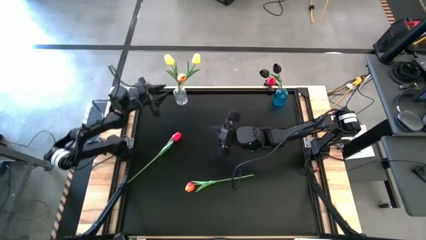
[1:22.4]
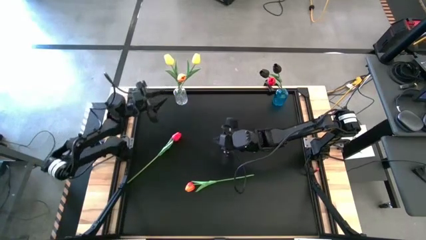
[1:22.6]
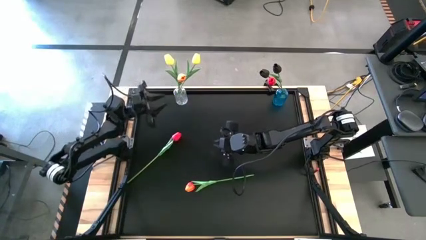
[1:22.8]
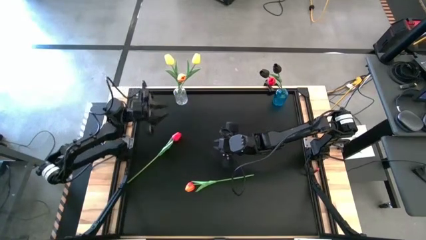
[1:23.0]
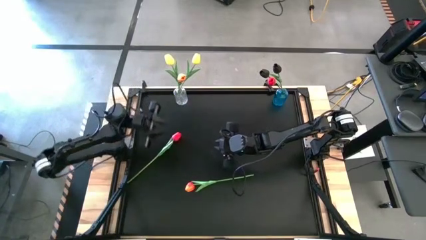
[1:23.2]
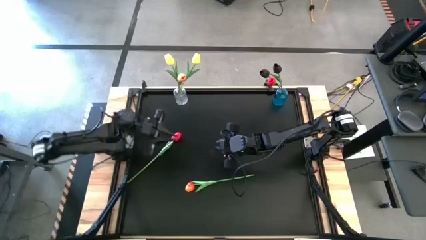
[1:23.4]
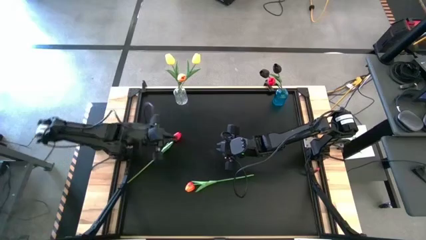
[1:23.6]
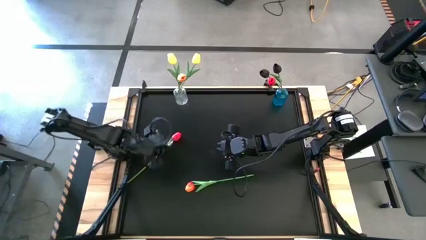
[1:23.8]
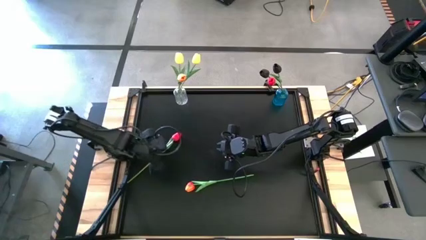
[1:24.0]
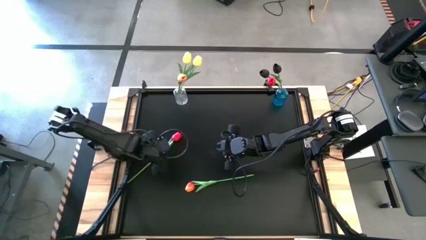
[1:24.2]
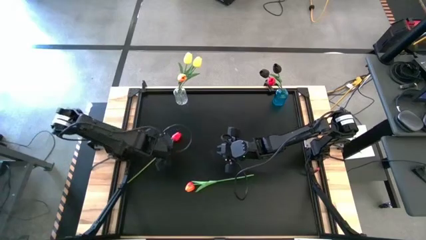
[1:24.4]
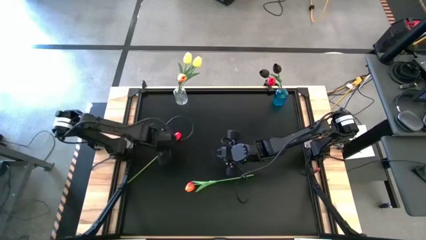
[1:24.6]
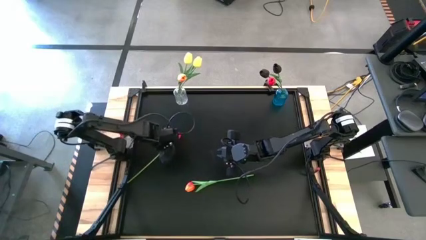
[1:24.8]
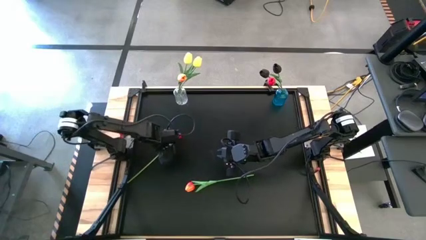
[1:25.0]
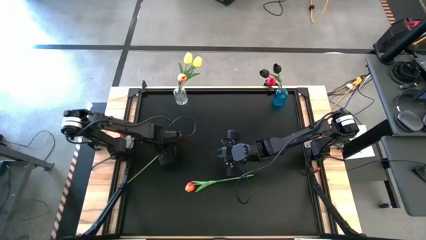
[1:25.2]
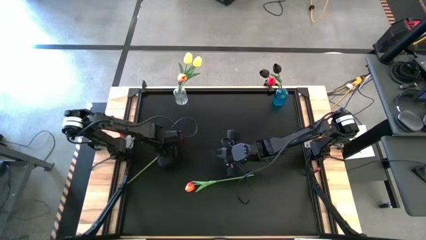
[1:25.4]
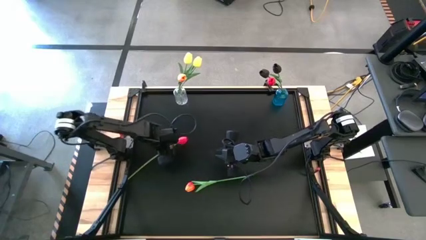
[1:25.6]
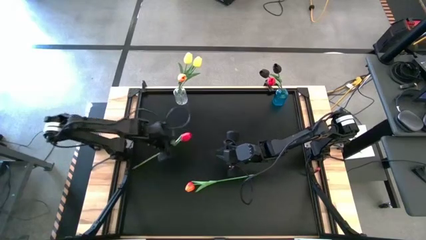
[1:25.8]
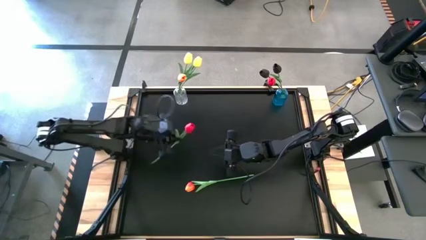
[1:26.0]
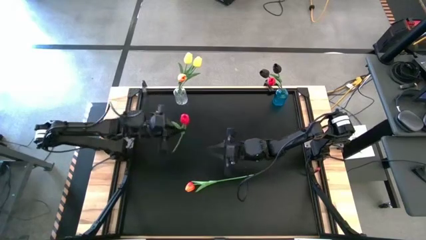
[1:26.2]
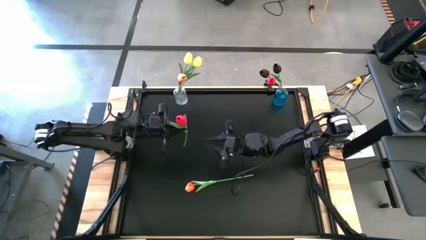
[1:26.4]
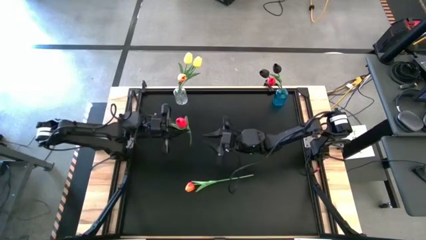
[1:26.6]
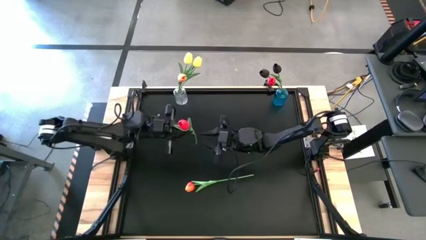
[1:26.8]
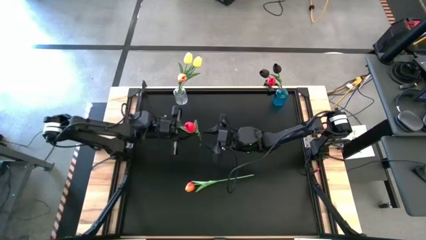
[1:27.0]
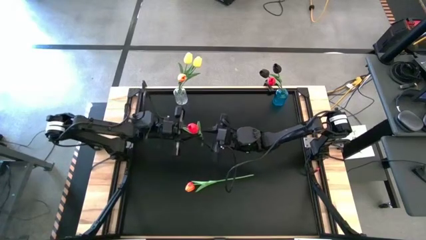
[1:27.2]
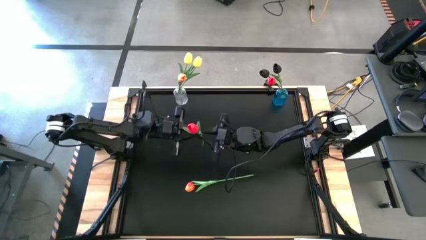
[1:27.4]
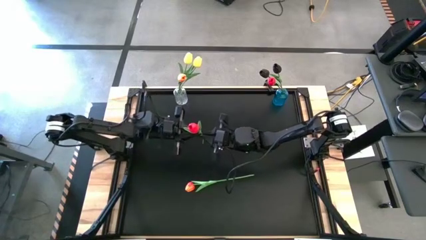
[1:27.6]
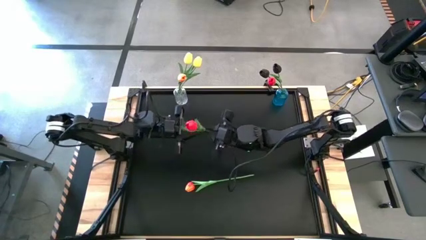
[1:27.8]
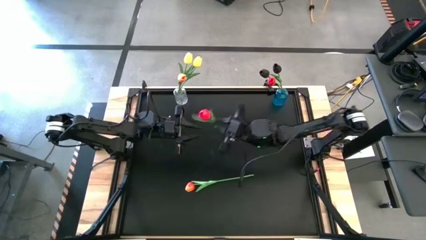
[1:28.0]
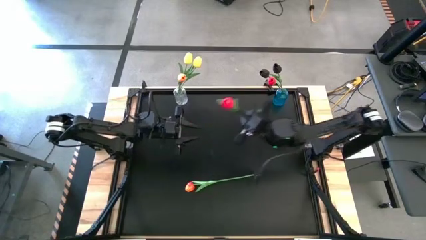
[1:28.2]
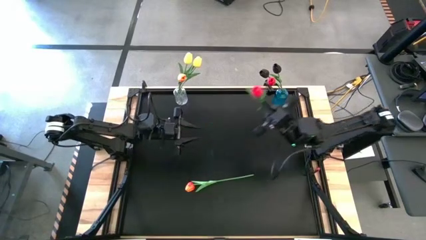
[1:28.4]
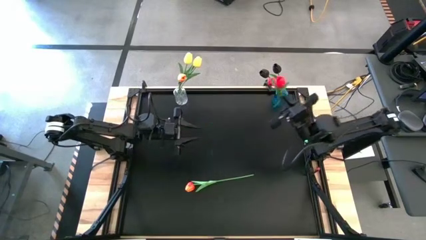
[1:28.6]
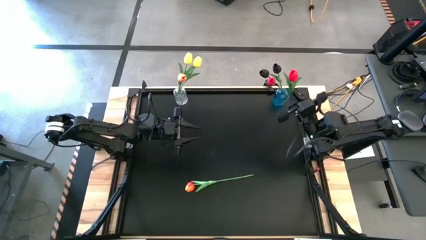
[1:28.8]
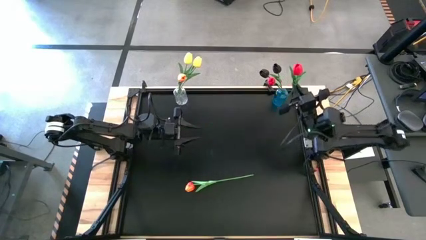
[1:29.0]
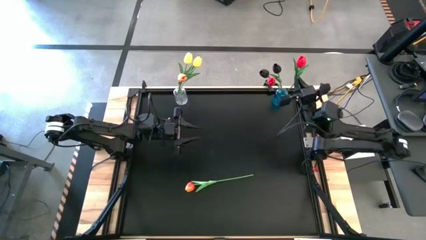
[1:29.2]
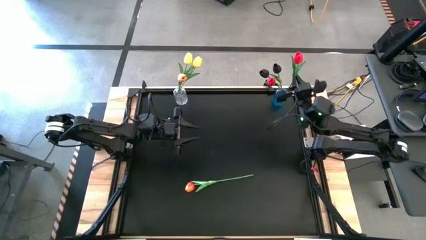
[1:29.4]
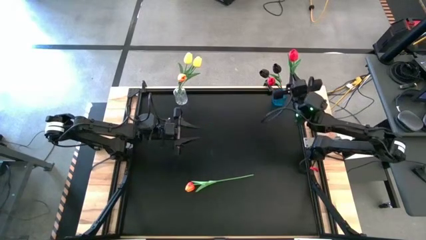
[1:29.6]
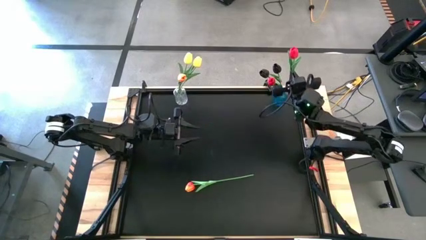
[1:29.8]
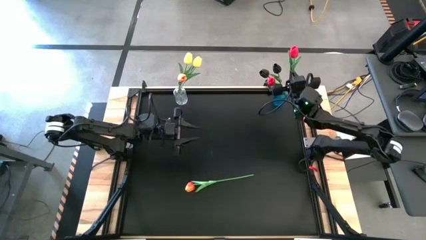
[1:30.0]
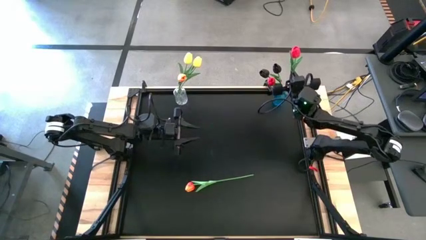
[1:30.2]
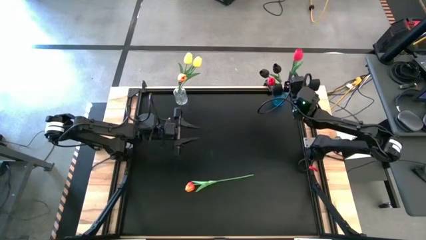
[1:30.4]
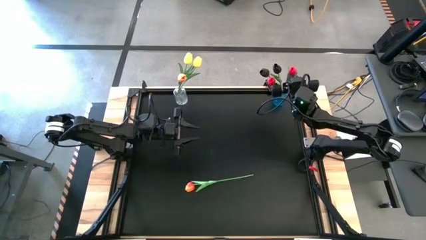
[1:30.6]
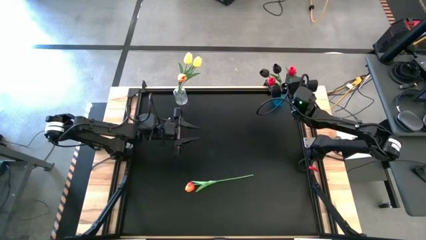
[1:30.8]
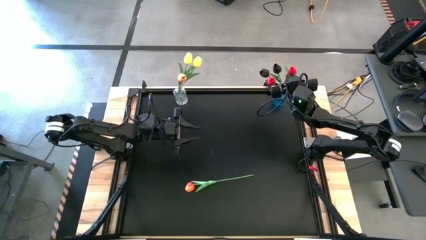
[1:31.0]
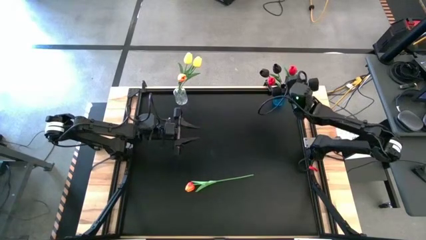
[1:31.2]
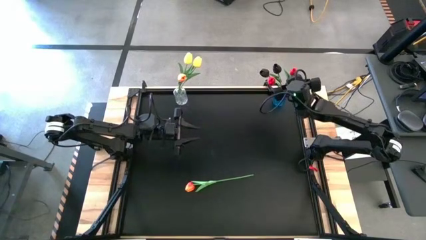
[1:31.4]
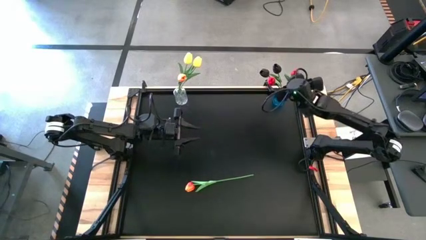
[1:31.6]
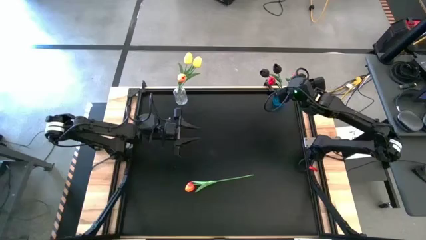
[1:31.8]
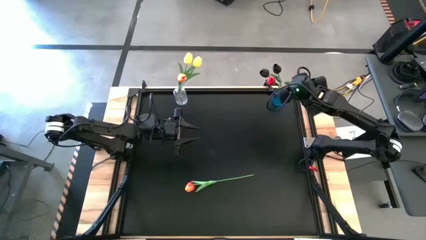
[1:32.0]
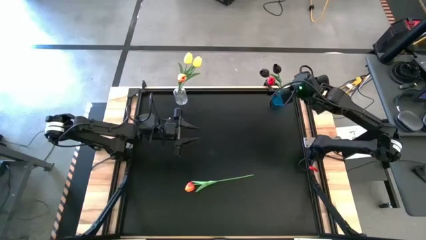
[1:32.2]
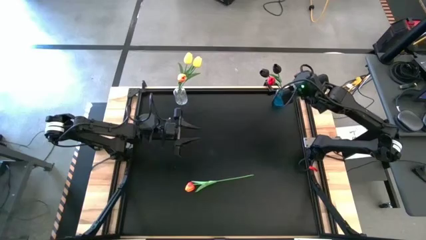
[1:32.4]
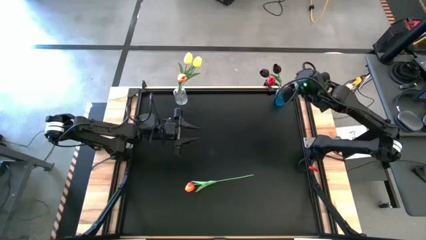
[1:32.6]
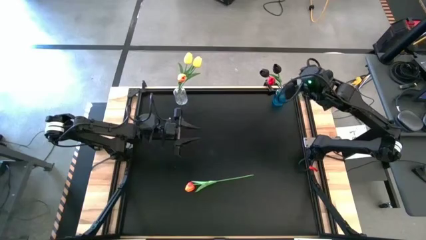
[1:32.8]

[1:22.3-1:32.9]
Task: Sort flowers into vase by color
Put the red flower into the blue vase

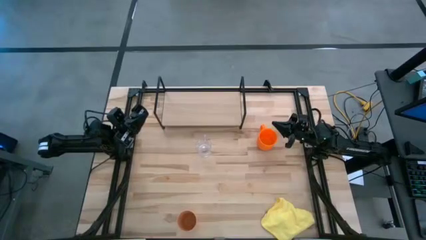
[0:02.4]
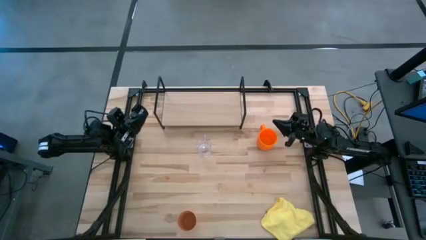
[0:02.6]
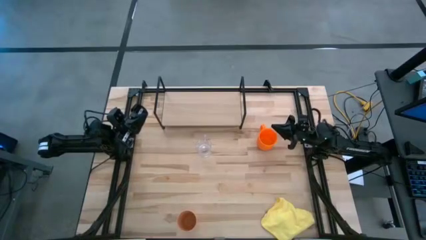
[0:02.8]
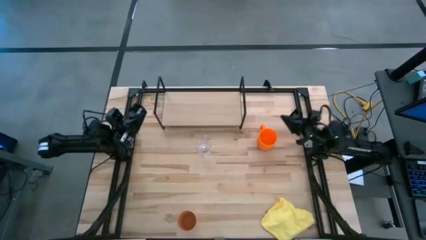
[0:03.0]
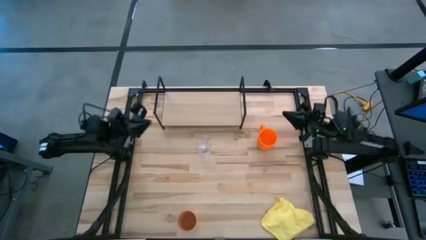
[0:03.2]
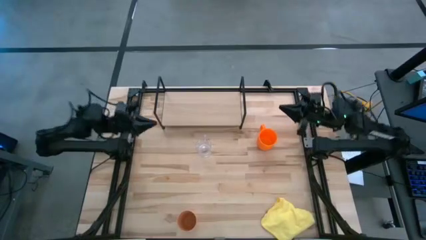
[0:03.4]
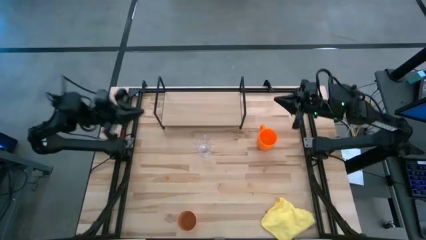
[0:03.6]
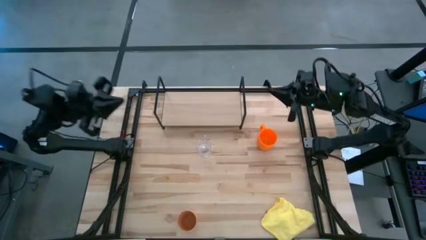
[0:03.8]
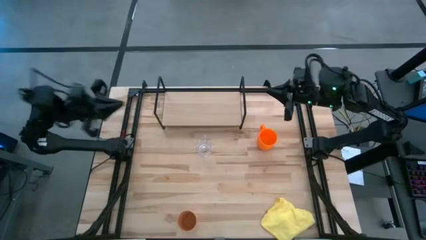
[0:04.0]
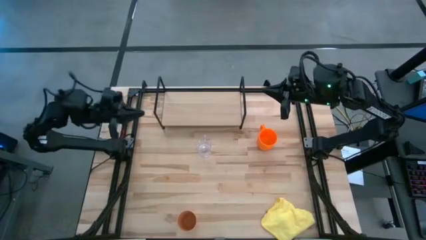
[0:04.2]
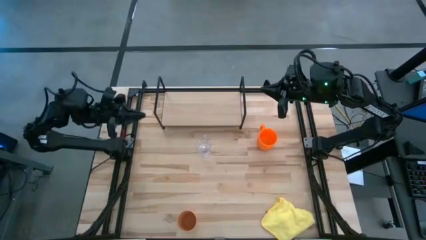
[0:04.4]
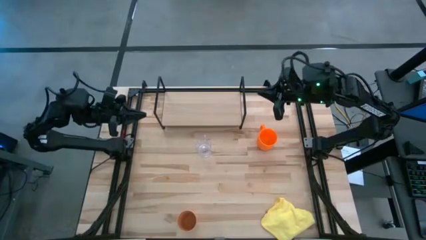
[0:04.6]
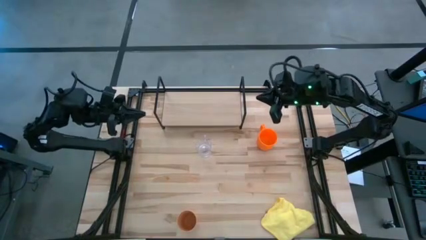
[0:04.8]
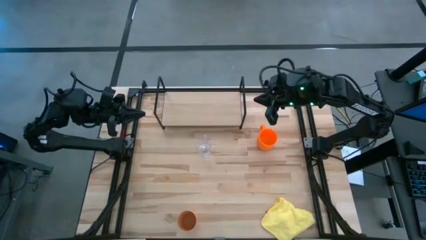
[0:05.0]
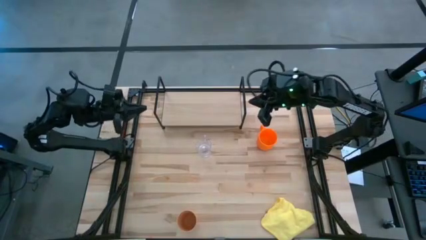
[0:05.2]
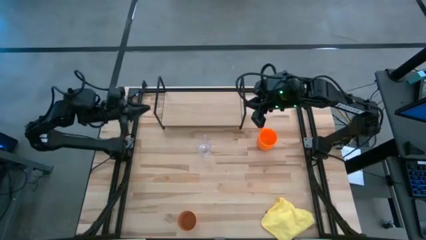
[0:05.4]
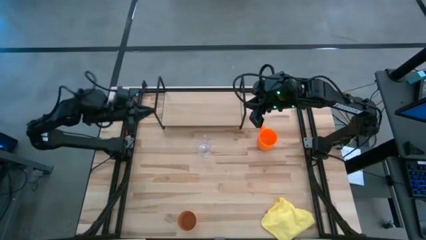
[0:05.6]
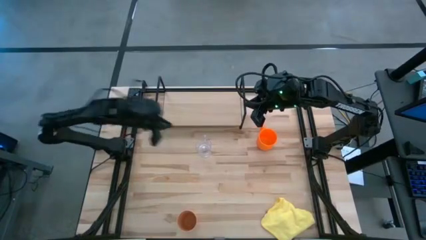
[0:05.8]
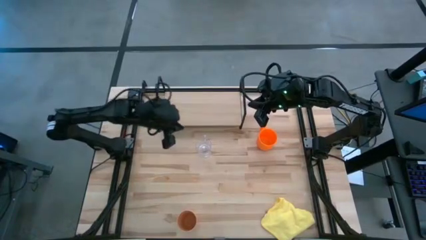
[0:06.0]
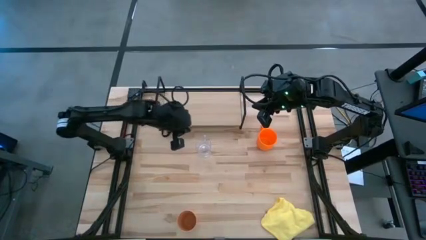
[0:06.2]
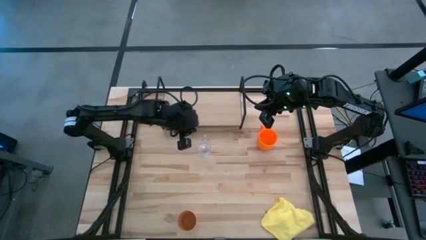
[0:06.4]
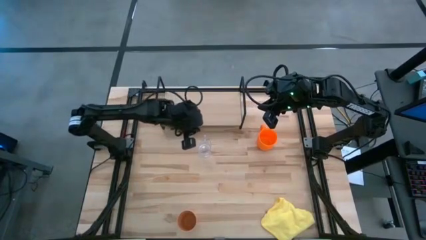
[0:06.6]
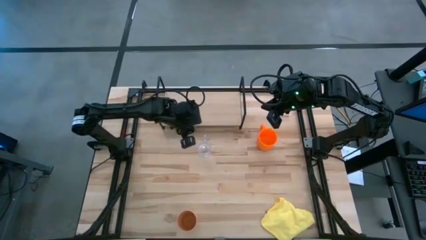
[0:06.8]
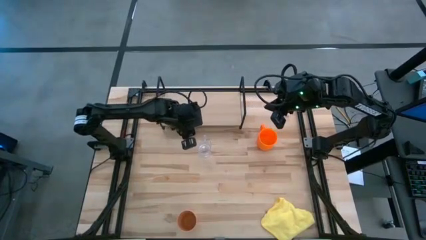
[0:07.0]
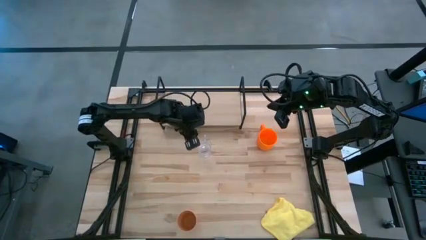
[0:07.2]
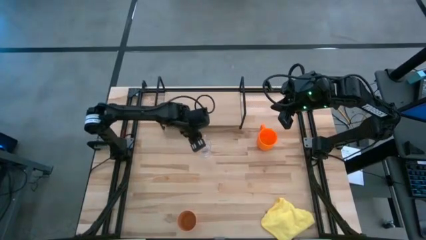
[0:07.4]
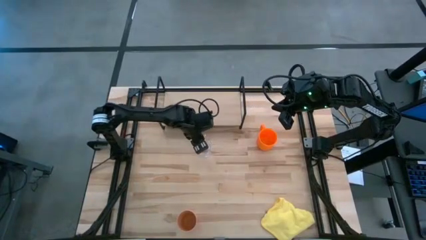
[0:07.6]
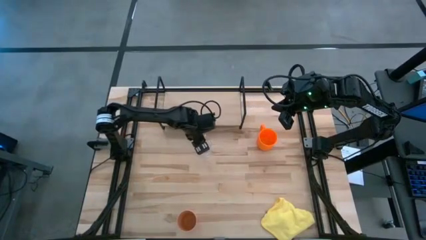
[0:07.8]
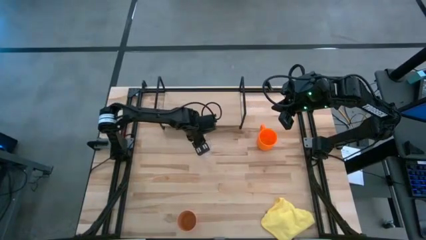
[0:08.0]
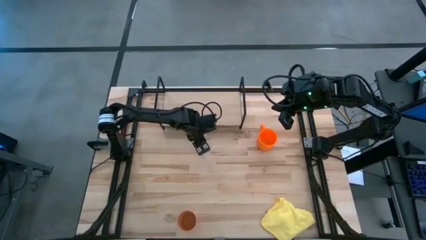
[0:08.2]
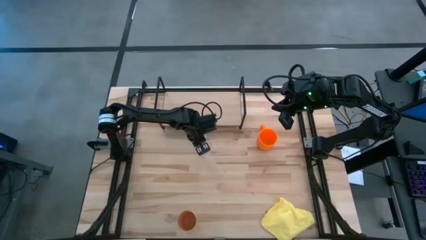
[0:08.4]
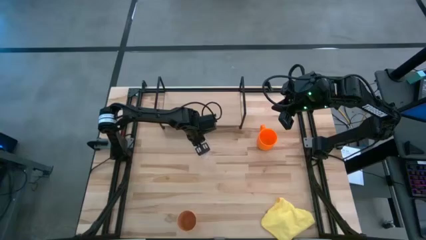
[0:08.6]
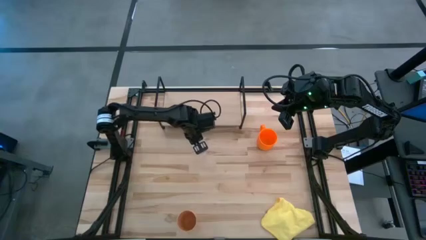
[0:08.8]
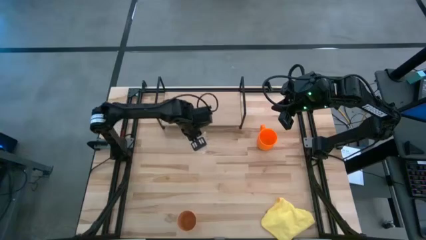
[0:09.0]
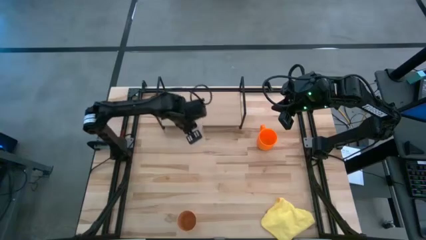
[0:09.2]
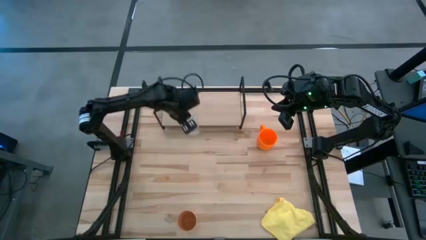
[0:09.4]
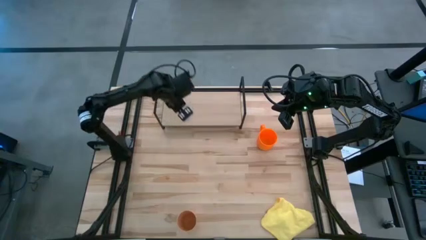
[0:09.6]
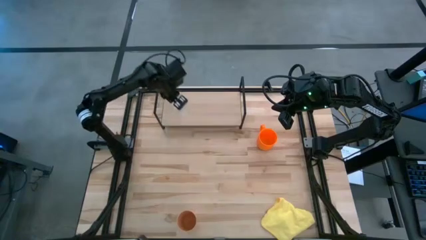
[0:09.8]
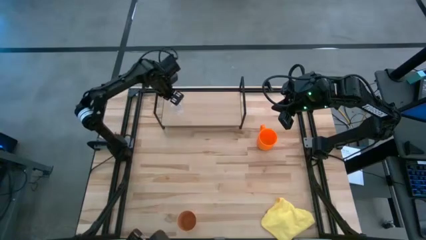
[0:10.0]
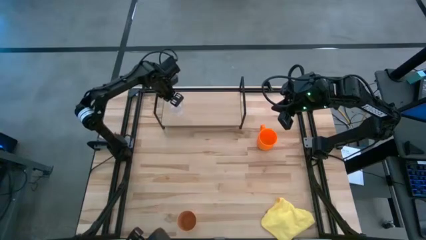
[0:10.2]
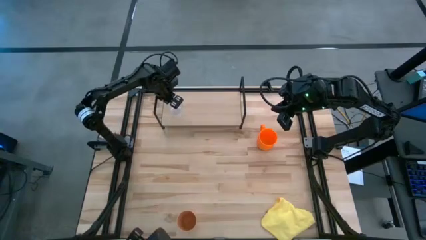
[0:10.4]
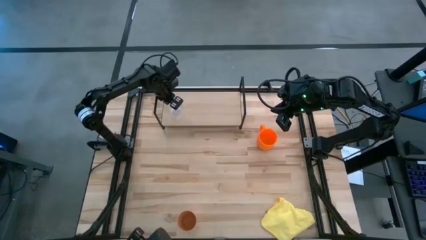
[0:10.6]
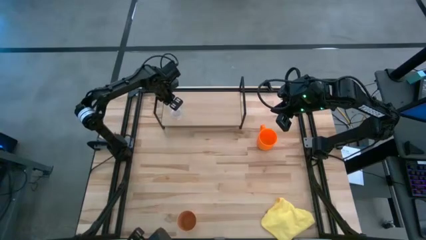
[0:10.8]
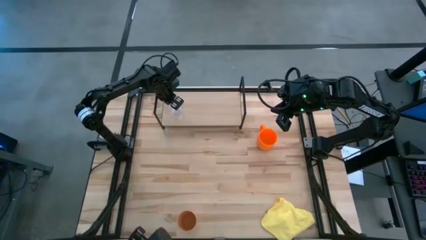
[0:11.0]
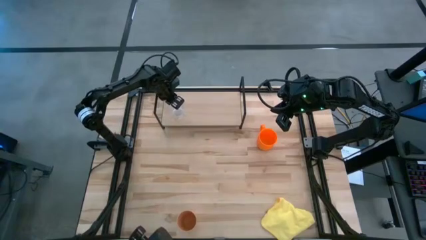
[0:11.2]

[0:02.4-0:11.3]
Task: Stack small to large cups/mugs on shelf
Put the transparent mug on the shelf
